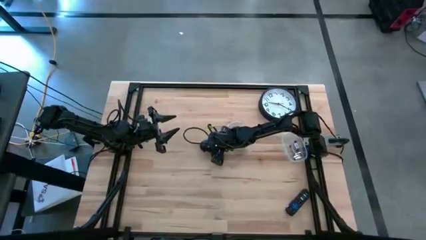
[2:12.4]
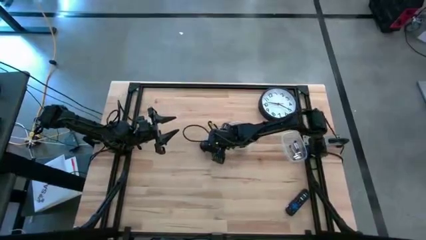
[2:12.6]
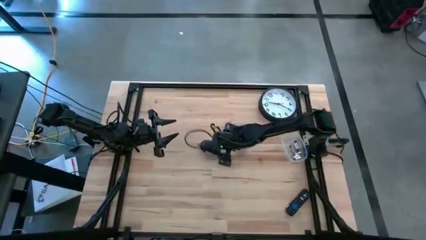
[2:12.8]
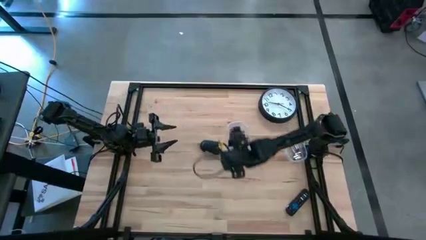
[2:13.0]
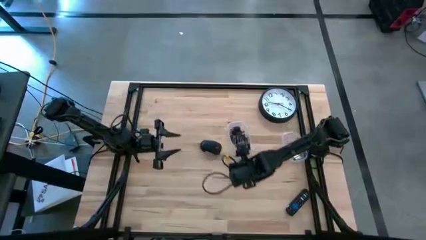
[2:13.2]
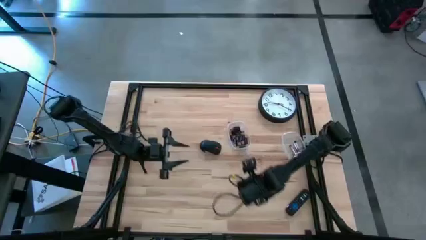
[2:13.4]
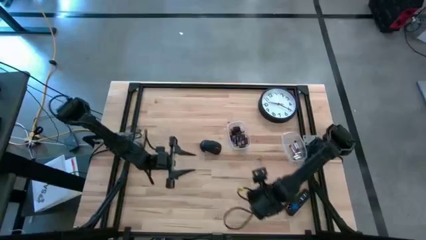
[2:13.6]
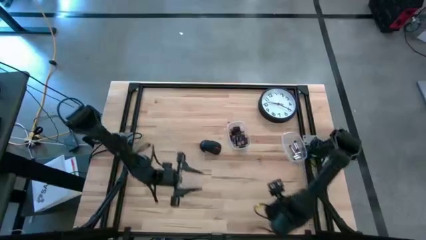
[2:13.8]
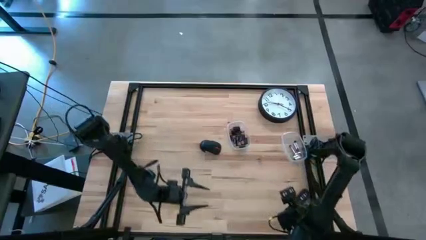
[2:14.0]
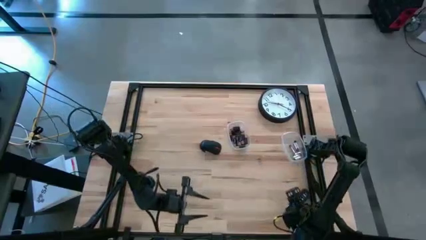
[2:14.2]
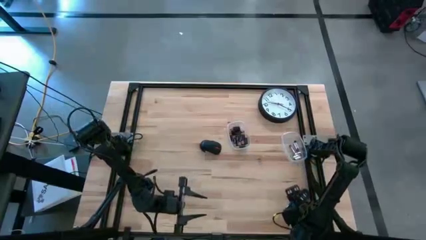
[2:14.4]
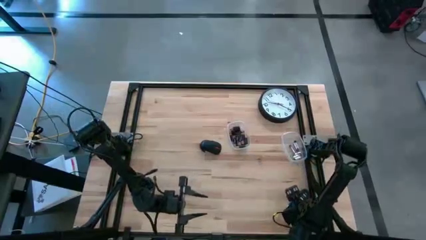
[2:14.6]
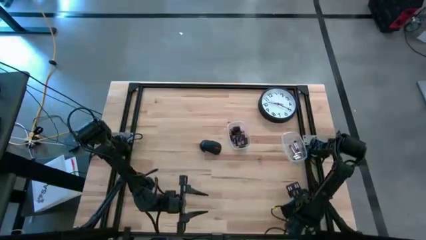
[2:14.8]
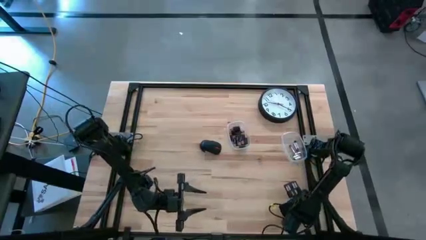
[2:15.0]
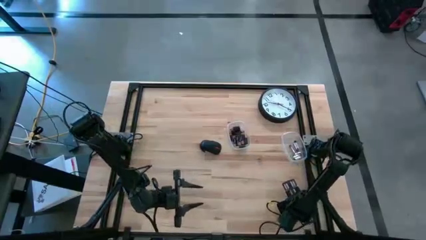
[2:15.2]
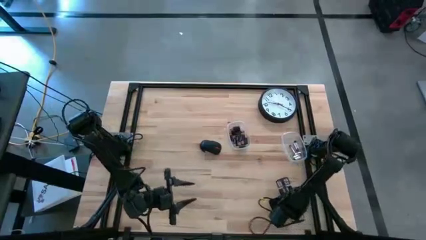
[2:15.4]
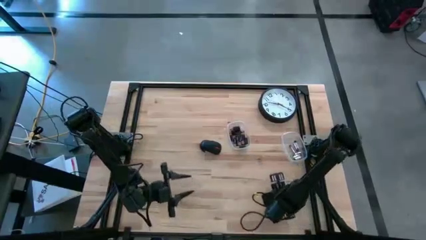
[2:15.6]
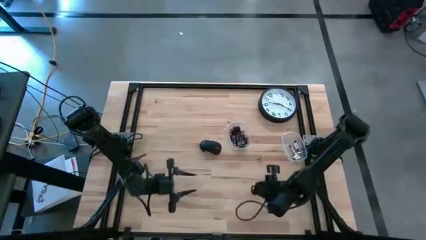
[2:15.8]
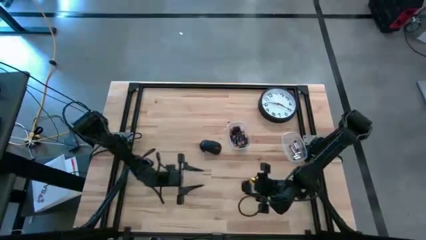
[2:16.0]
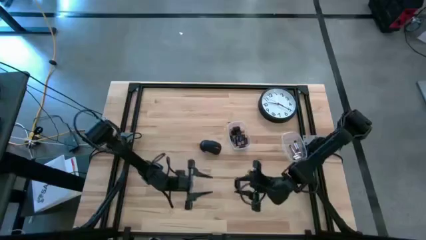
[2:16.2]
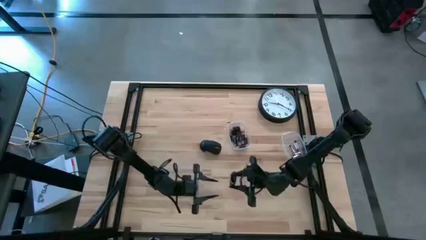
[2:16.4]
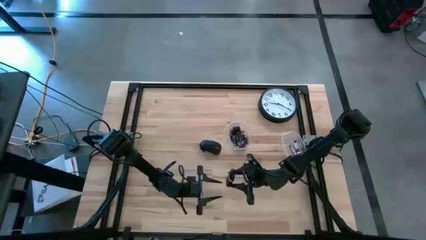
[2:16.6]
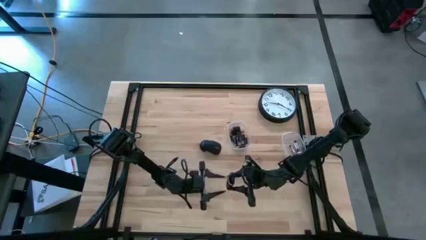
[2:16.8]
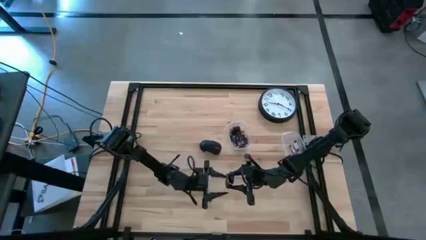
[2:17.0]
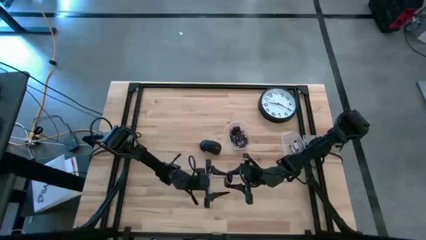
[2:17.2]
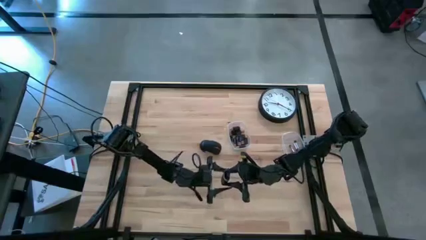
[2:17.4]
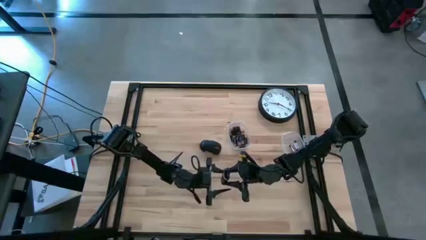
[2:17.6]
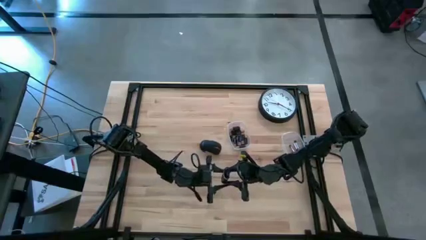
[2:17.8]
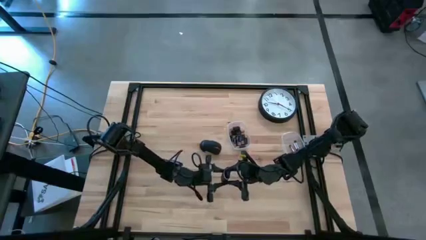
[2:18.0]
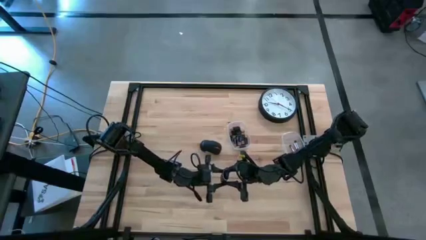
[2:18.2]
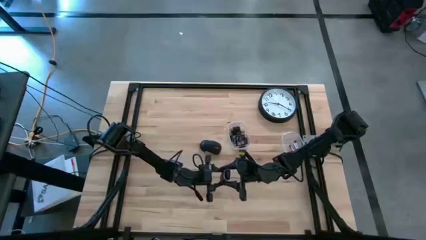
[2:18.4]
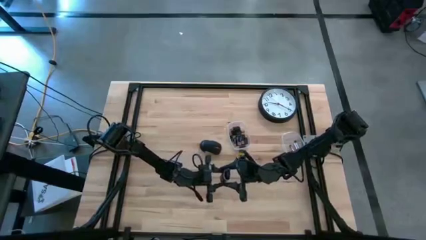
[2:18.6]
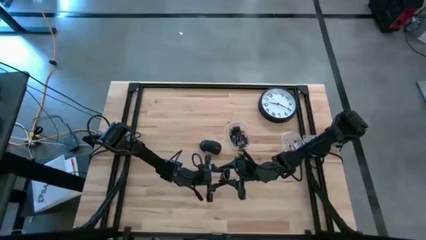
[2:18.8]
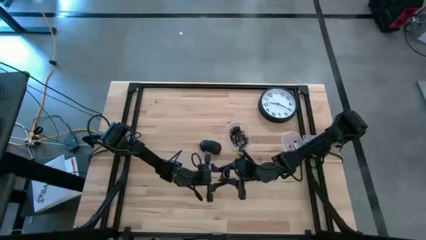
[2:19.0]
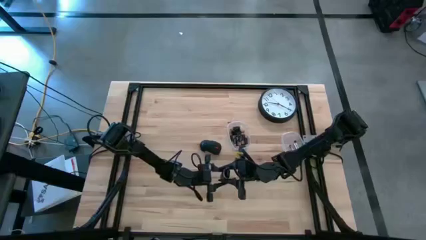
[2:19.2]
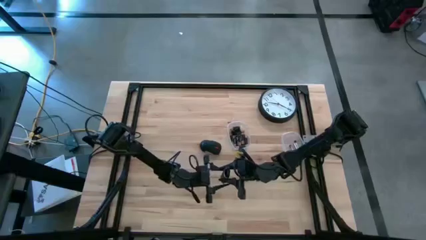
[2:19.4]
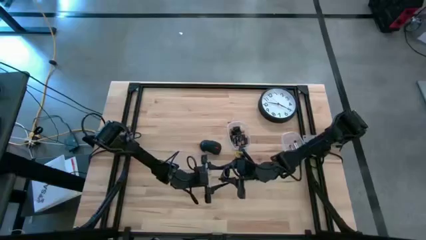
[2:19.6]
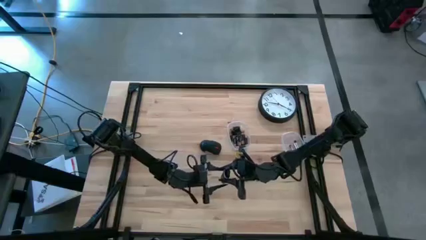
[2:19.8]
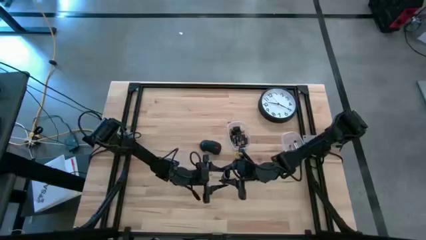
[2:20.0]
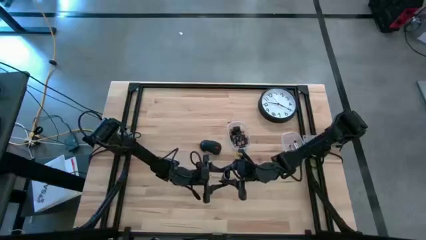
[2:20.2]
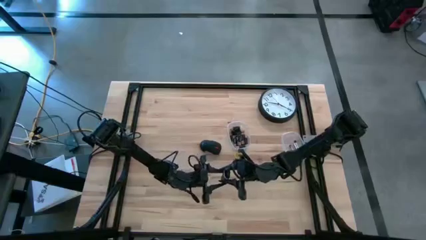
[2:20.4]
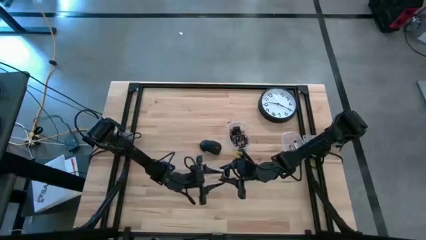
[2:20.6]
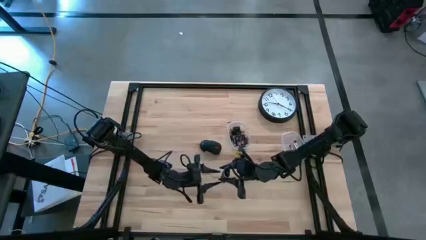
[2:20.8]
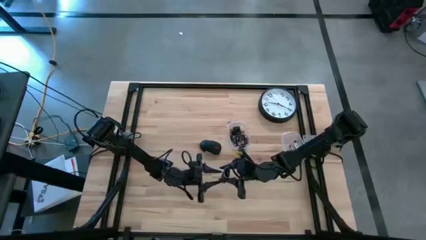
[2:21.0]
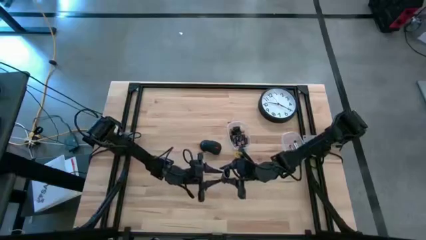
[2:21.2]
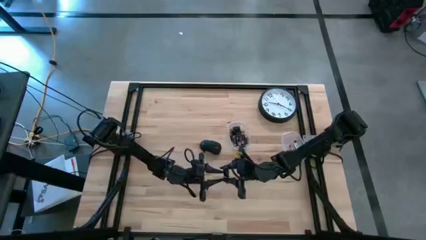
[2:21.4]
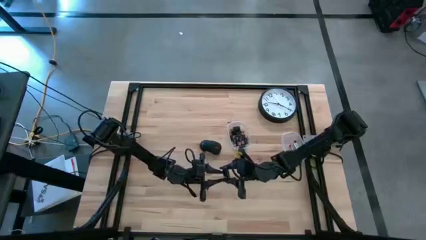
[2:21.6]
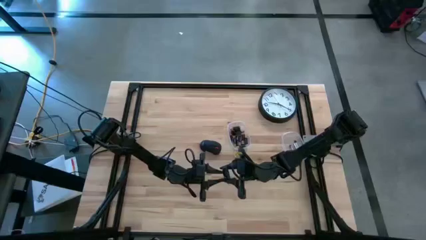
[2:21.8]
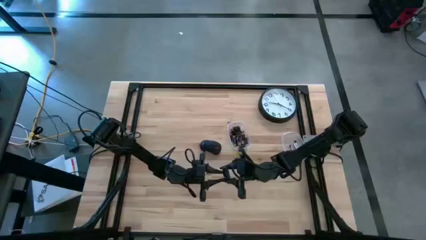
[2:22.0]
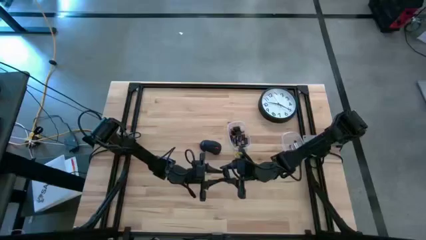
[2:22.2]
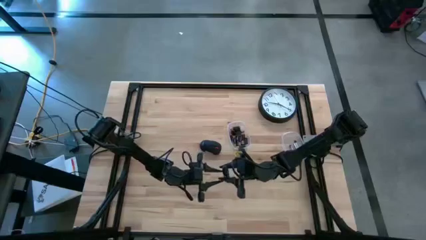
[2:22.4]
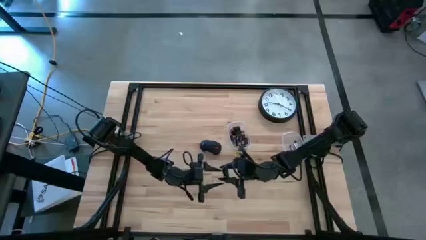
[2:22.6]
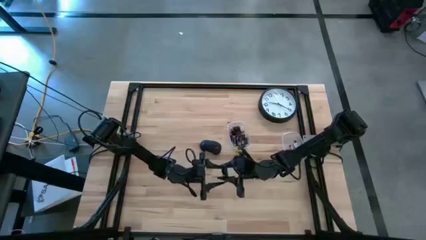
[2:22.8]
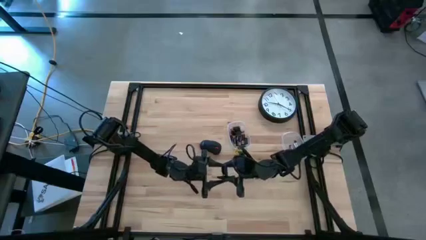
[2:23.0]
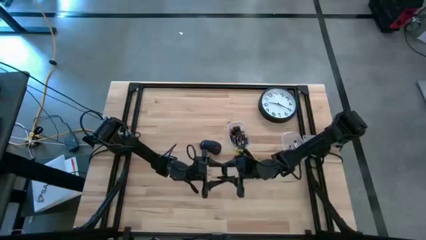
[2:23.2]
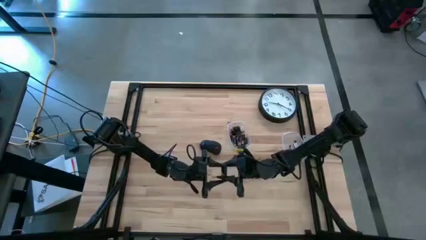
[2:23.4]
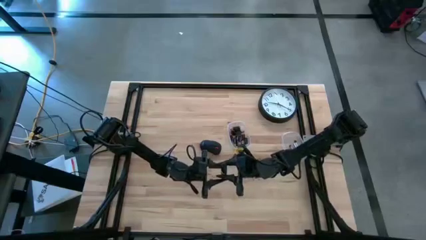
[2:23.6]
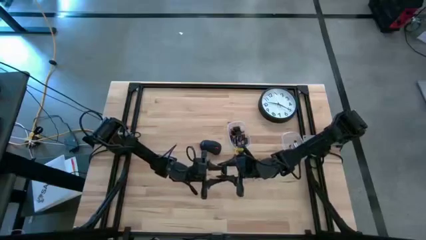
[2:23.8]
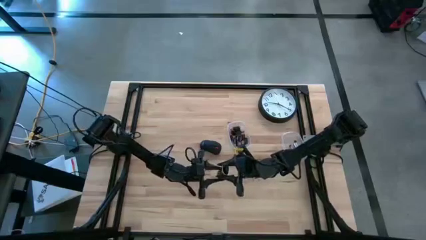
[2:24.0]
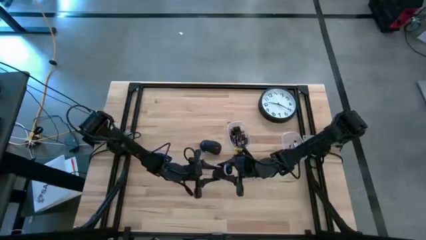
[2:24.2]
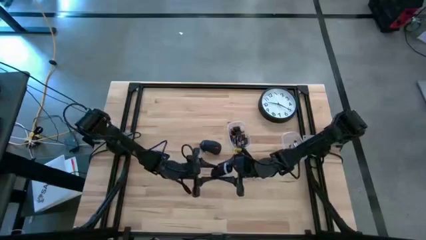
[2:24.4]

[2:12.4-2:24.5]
Task: Insert battery
Remove the black cover of the remote

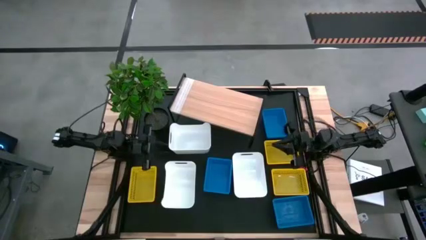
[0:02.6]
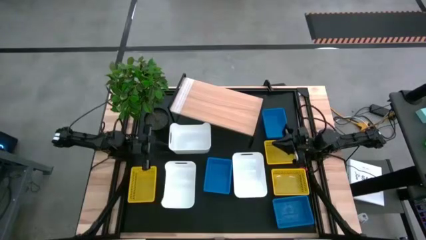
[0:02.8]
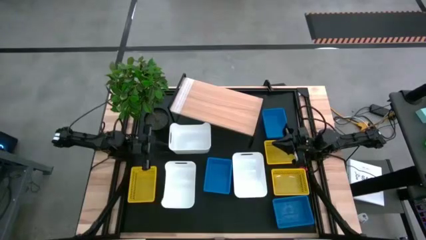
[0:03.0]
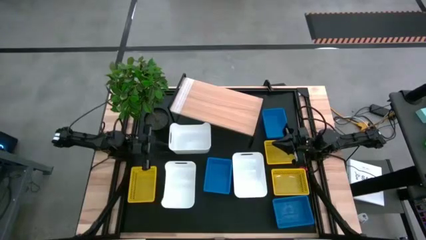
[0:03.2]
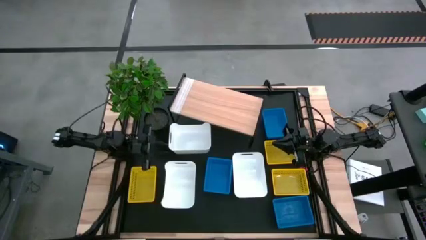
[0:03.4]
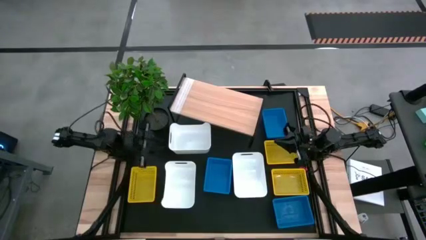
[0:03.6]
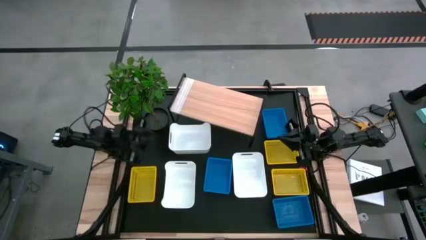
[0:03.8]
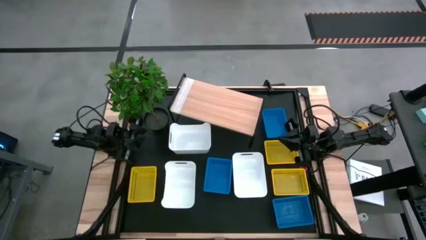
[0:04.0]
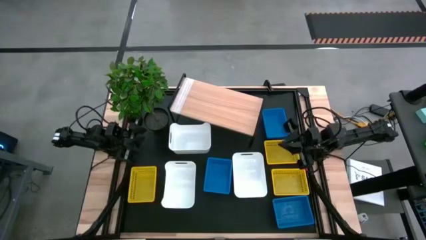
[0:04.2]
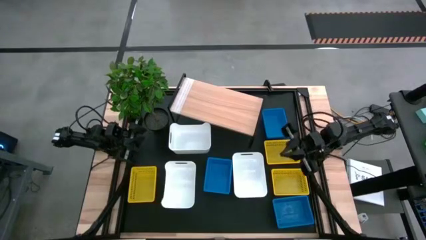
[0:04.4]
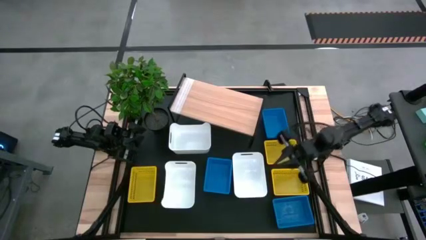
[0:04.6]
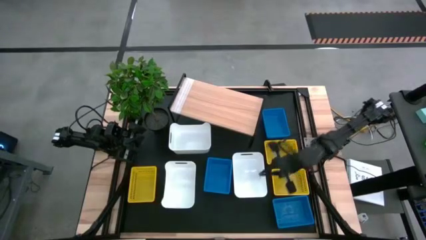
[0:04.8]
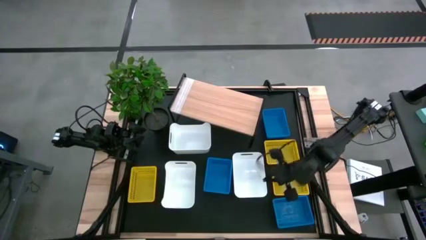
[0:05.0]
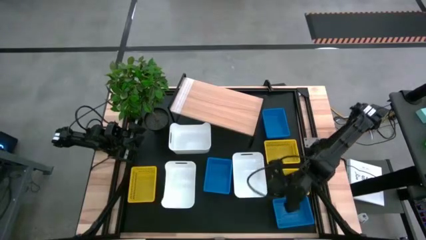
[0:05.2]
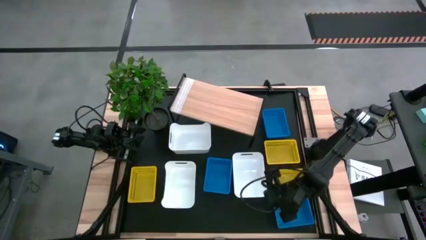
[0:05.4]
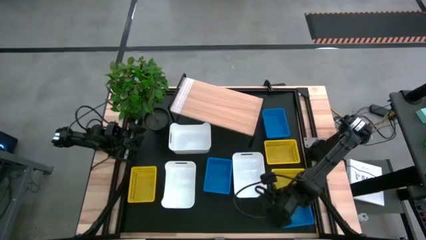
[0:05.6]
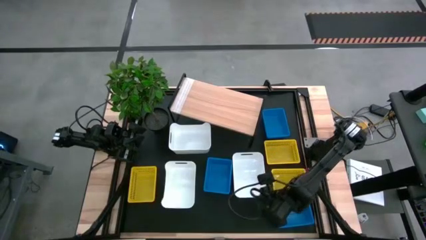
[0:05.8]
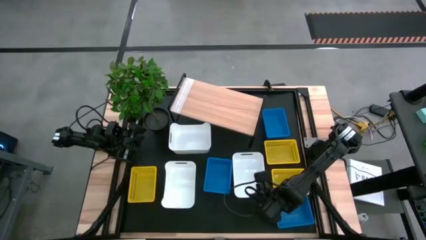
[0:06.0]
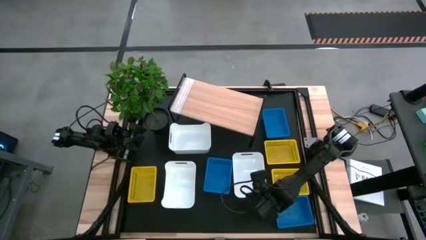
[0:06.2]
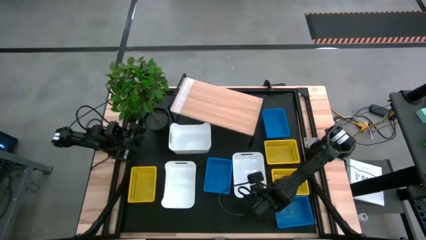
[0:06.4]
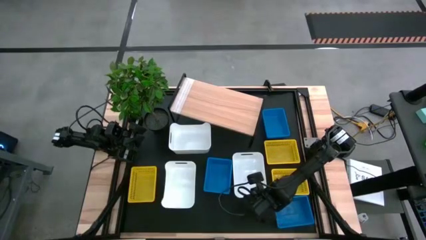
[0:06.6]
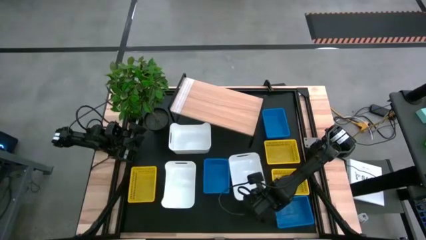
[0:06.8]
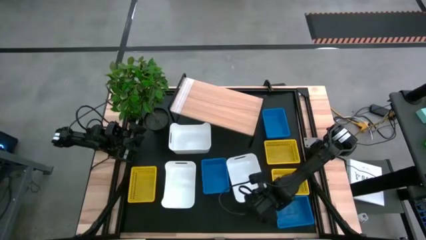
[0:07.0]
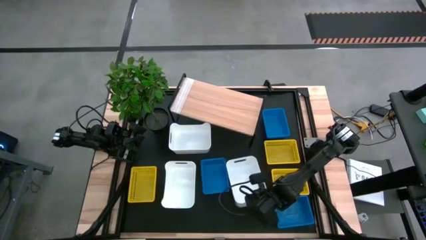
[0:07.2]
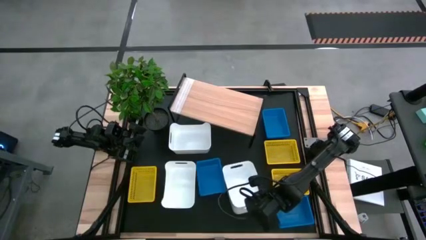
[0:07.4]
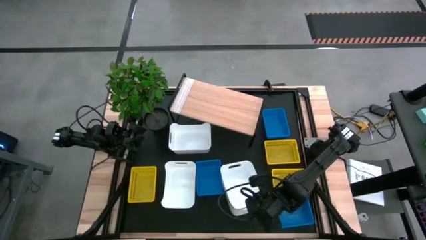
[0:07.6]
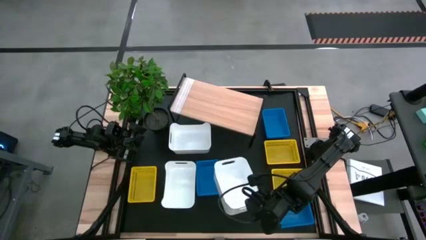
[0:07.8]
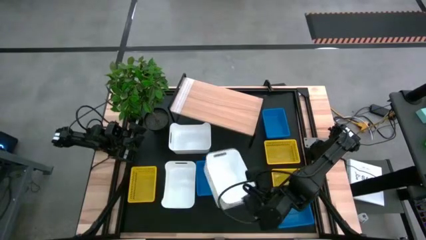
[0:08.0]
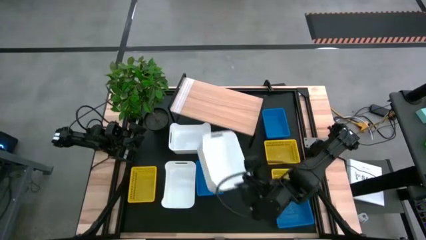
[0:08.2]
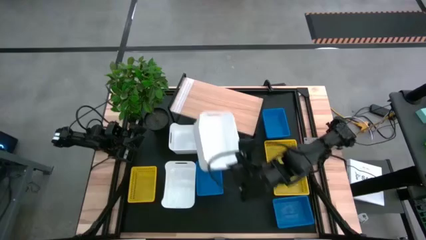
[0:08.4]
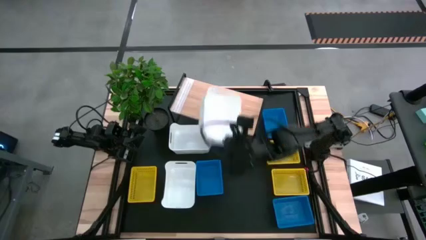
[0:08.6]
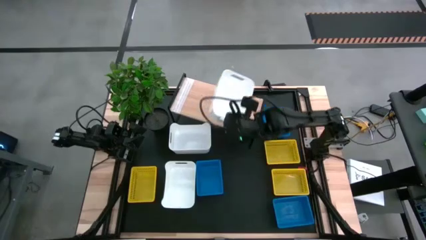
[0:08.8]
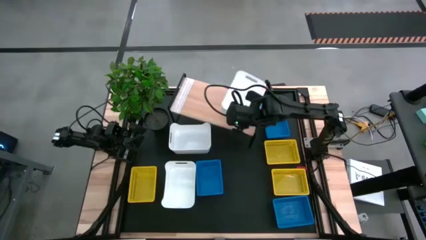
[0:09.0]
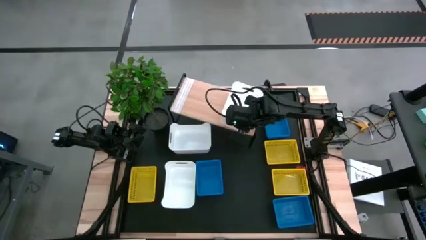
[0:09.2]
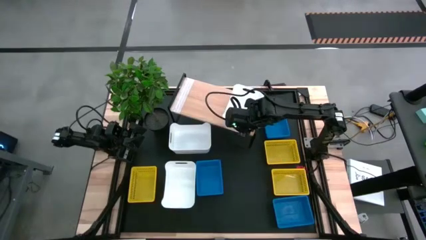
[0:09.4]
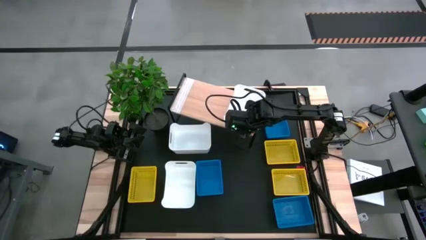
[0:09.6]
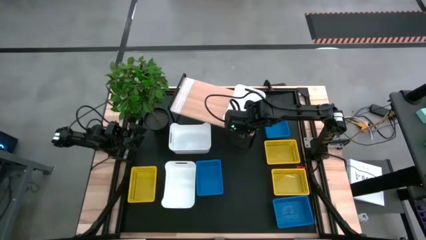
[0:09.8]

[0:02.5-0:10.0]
Task: Stack baskets on shelf by color
Put the right white bin on the shelf
